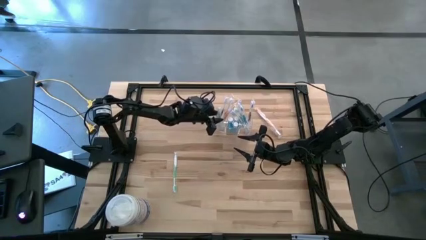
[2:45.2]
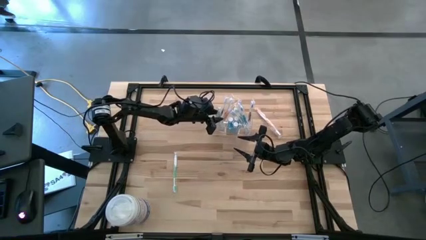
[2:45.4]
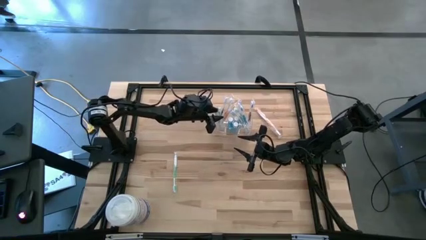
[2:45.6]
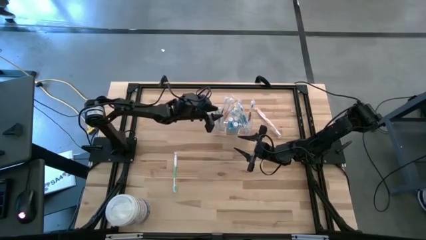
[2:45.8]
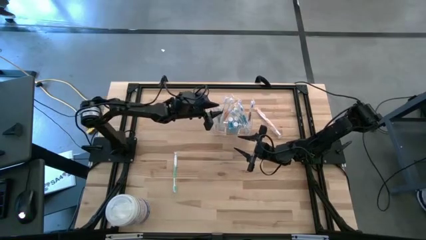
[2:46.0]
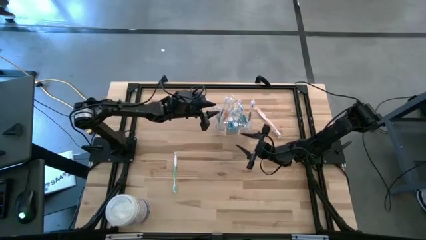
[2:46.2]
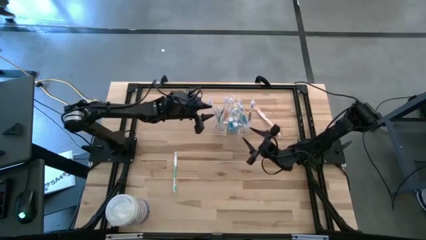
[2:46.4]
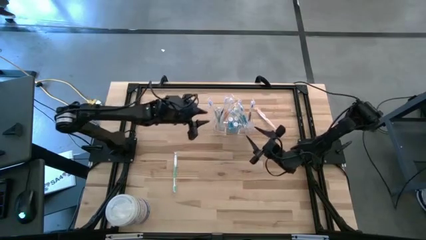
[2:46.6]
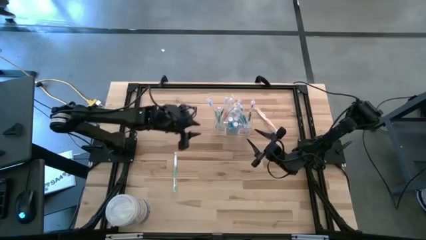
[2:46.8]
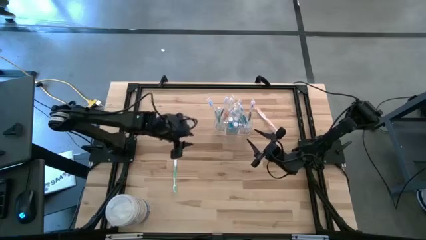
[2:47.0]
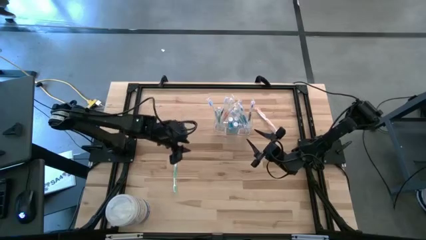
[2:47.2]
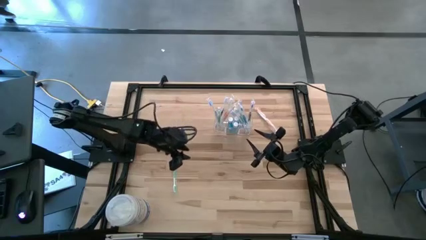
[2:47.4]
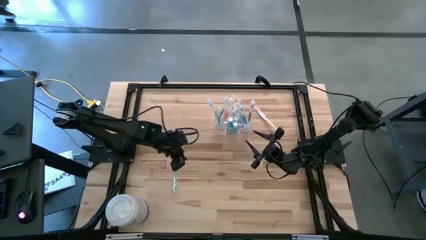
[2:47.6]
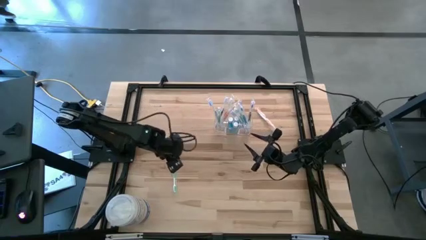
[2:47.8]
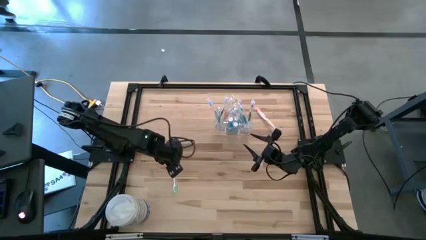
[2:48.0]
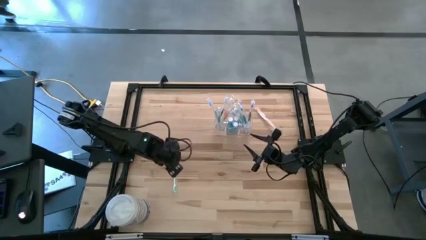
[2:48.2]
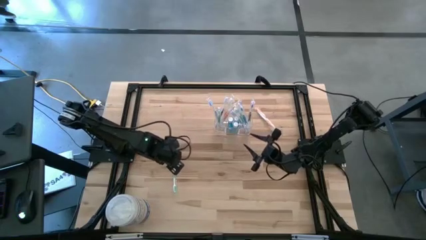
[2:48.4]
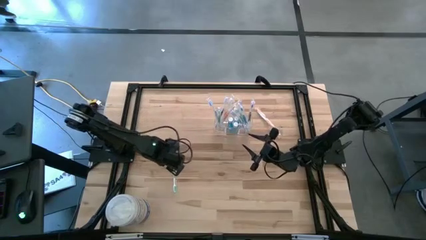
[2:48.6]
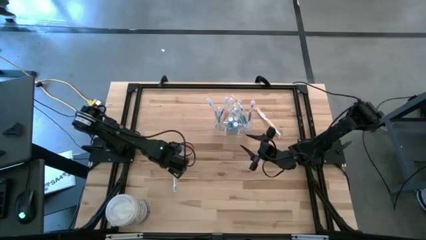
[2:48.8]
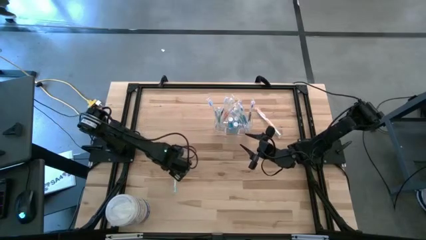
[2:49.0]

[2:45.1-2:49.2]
Task: Pick & Place toothbrushing station
Put the green toothbrush into the transparent organizer

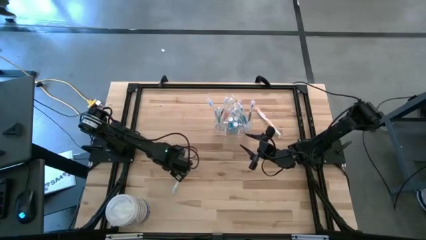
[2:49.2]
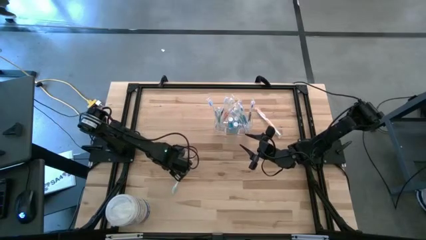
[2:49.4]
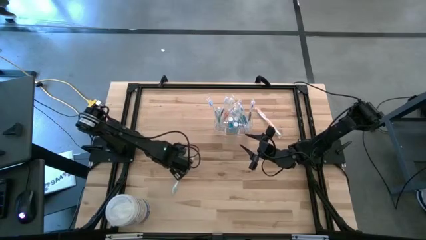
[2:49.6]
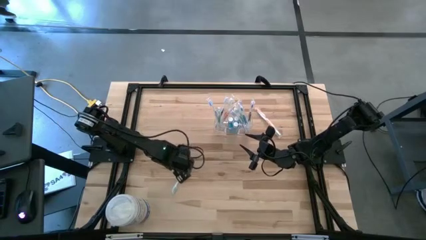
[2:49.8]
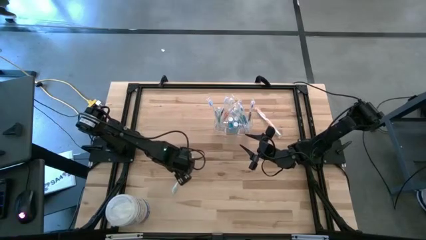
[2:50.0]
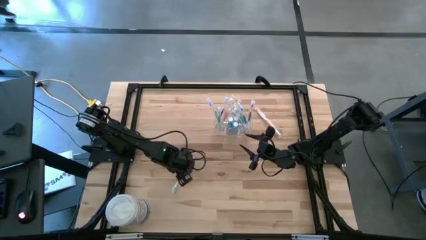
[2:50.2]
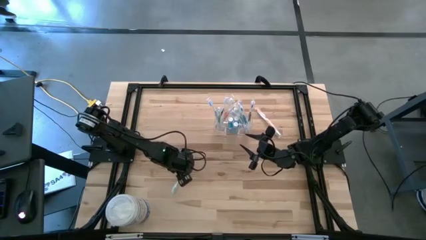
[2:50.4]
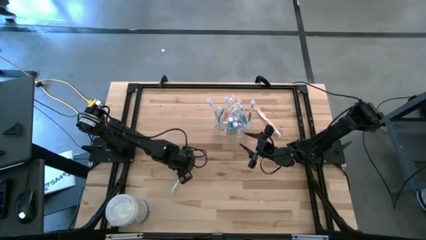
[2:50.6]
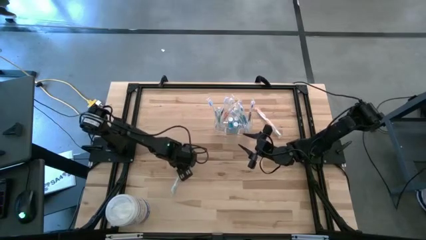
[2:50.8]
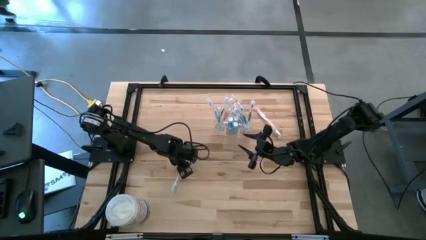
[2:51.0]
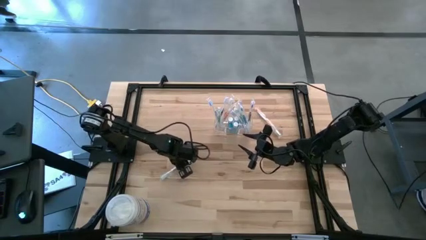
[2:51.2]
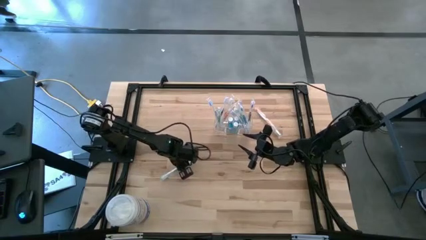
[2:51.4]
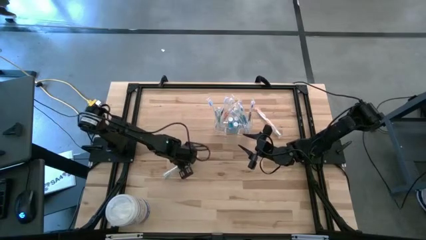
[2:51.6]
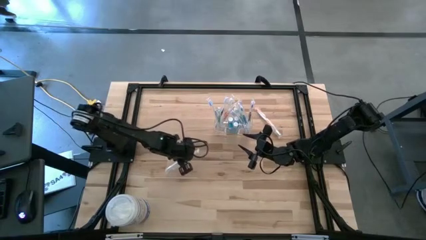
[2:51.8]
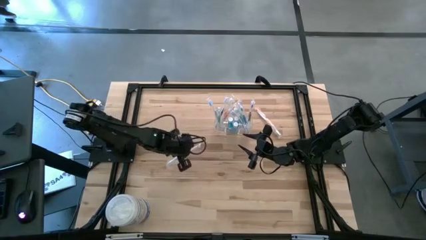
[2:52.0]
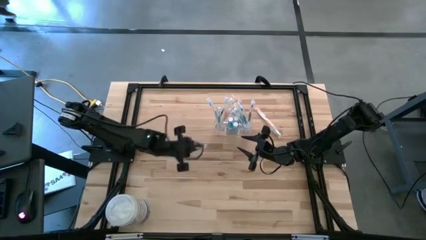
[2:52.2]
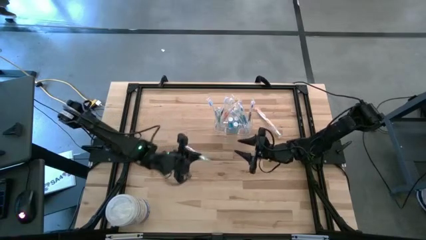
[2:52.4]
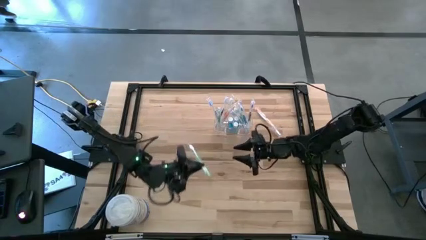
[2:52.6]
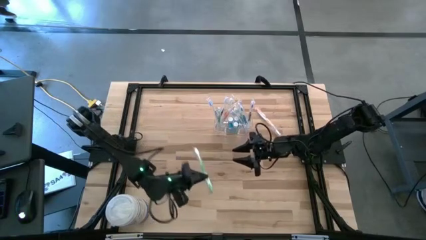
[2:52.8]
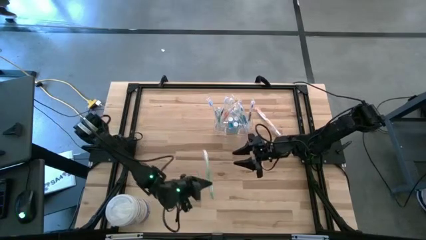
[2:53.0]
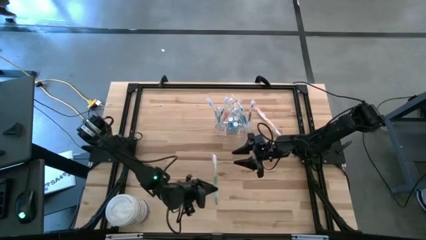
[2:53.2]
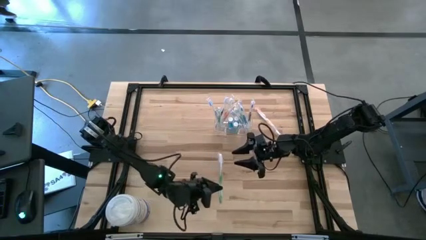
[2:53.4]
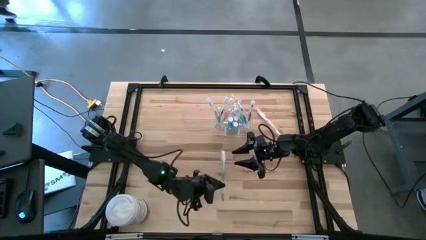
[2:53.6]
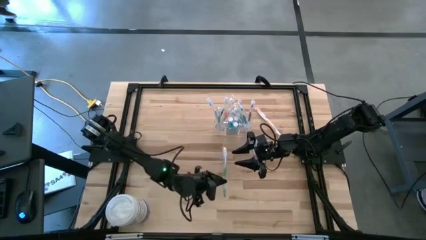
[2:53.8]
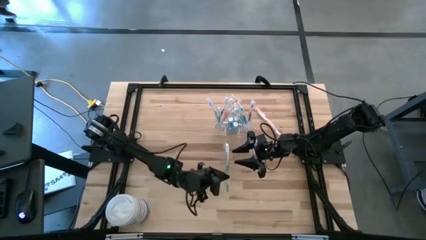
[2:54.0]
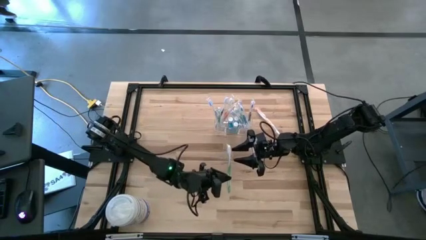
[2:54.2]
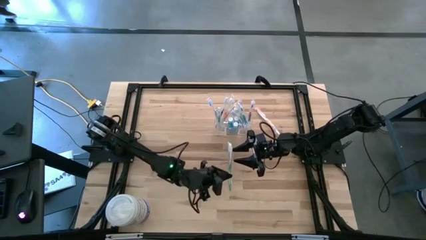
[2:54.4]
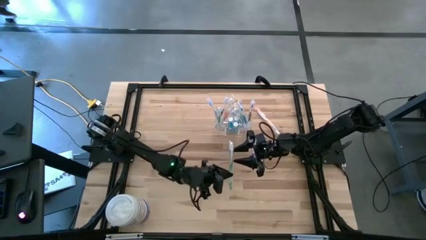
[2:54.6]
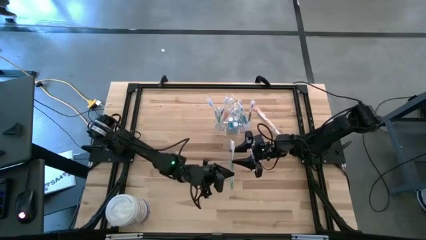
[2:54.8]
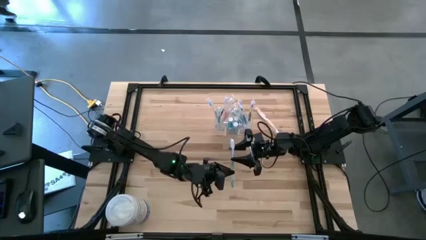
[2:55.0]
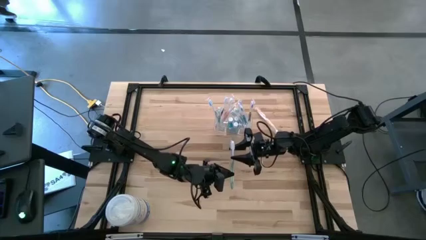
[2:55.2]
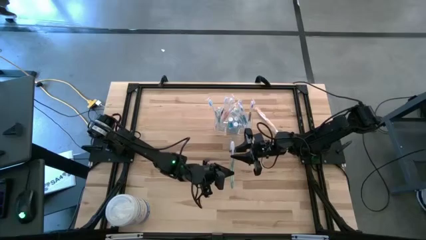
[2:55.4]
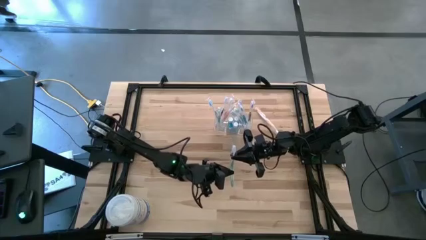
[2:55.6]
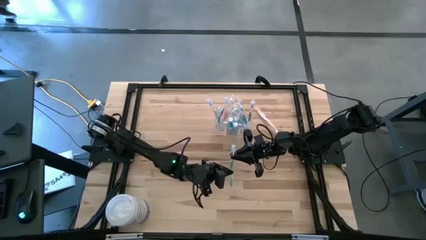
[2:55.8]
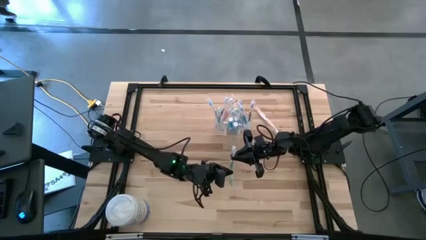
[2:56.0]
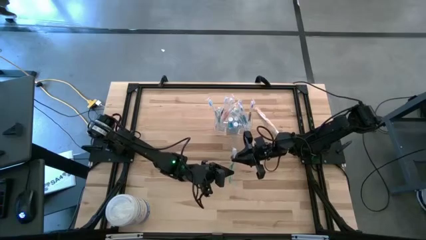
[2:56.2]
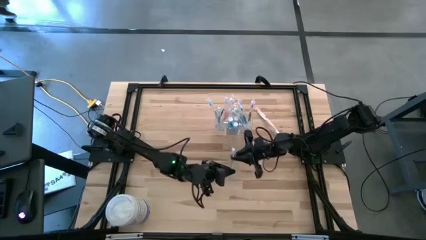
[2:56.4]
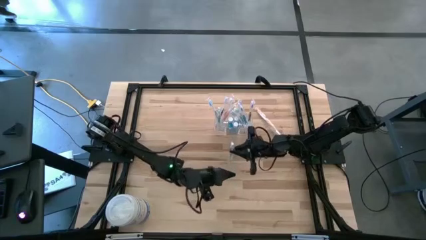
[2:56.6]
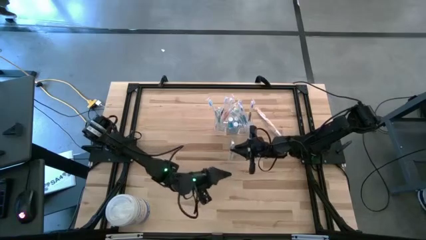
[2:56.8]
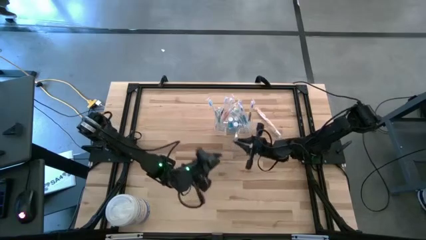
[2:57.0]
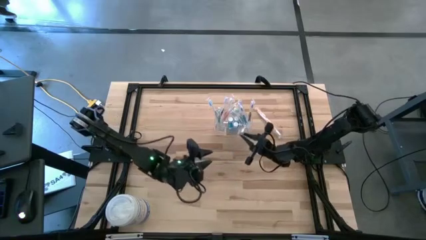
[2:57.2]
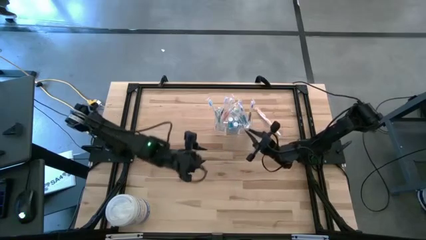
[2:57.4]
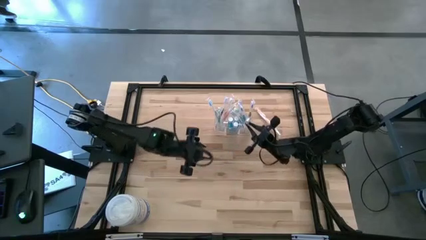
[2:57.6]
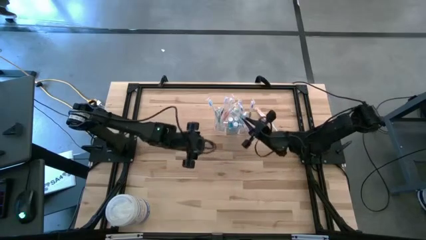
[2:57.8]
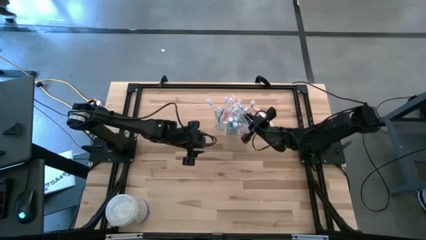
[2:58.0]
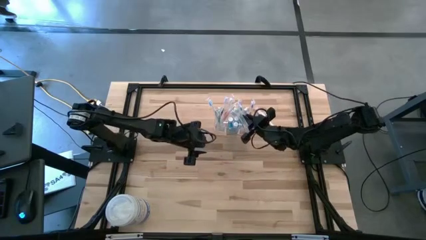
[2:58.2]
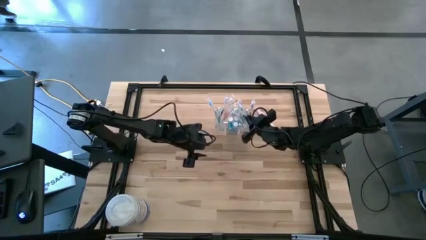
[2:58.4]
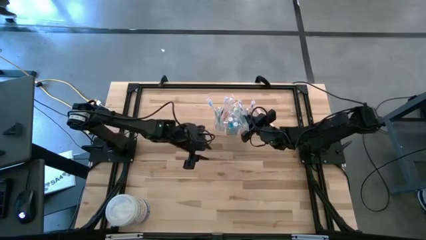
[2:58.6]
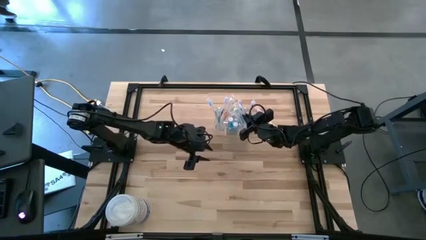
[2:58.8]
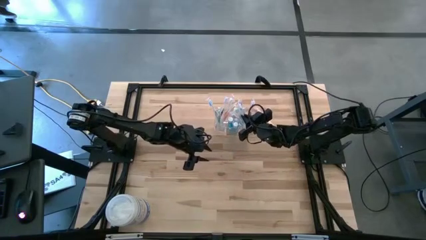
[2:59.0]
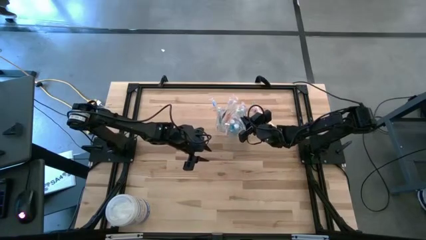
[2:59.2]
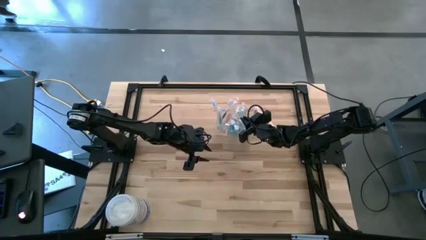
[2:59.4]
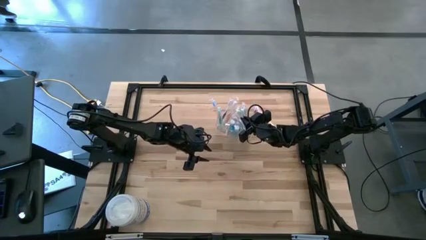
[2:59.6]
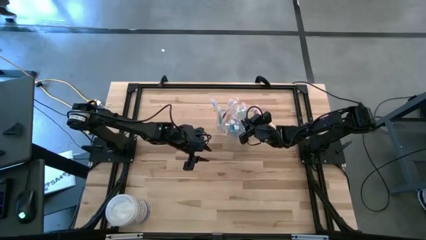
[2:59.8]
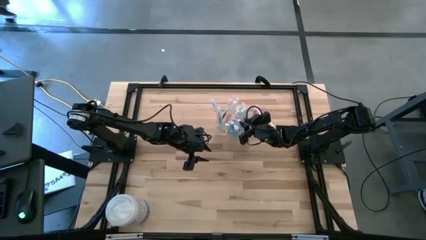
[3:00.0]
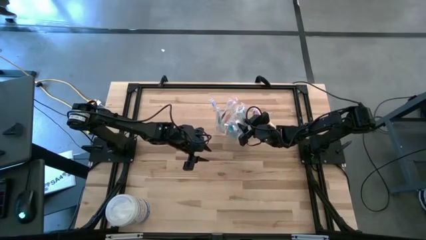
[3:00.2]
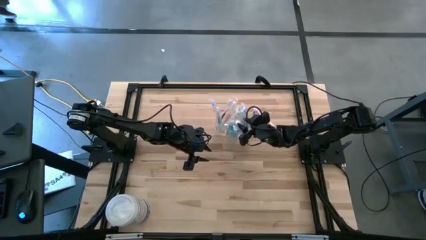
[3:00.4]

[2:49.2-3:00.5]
Put the green toothbrush into the transparent organizer

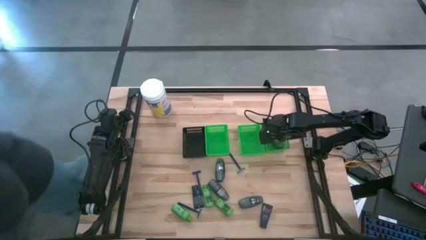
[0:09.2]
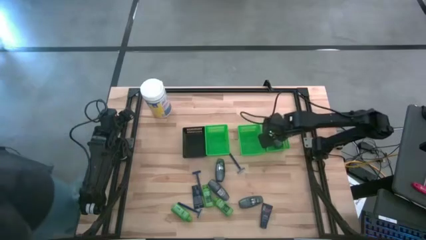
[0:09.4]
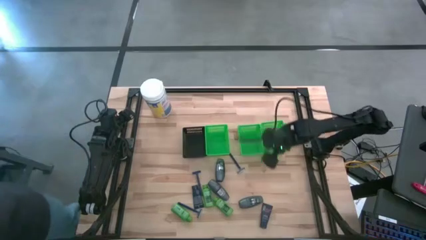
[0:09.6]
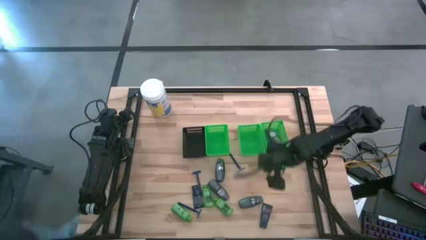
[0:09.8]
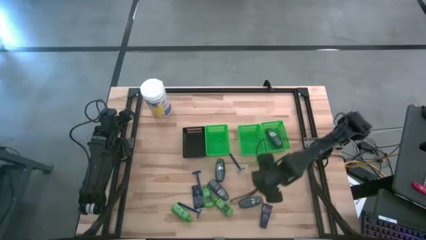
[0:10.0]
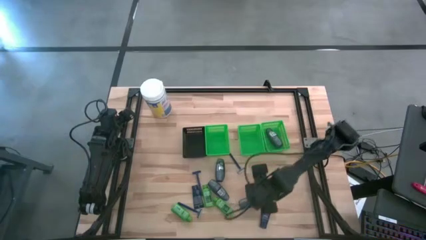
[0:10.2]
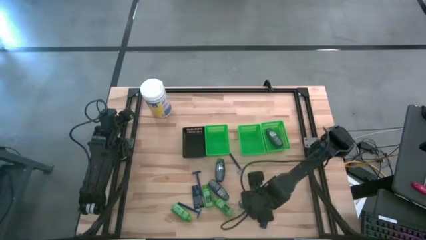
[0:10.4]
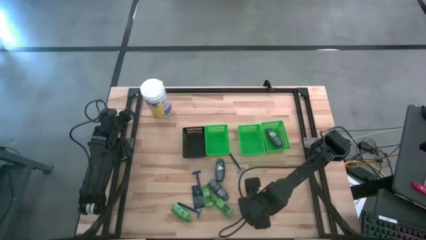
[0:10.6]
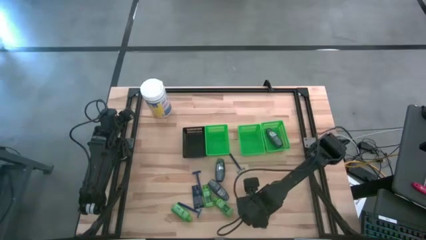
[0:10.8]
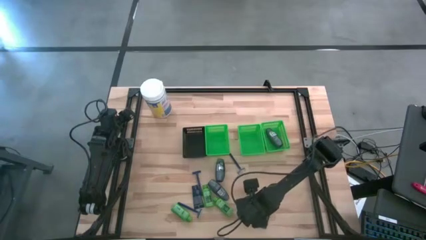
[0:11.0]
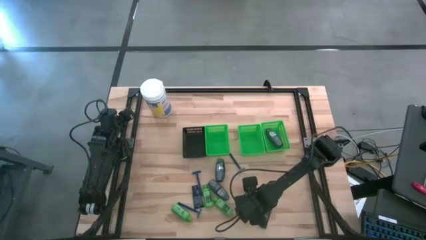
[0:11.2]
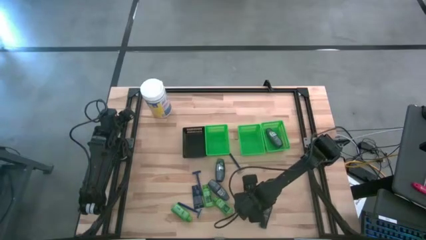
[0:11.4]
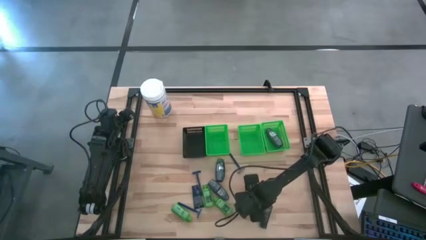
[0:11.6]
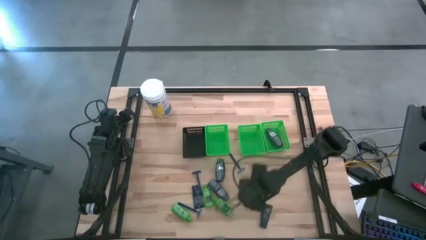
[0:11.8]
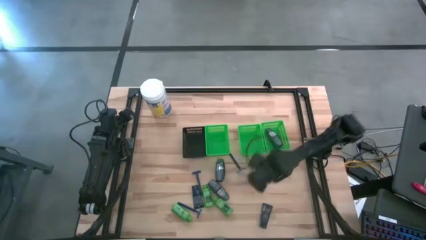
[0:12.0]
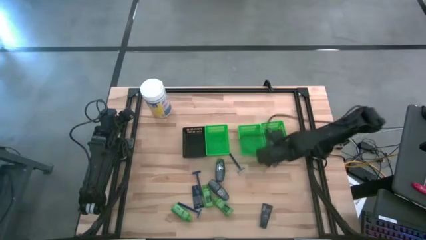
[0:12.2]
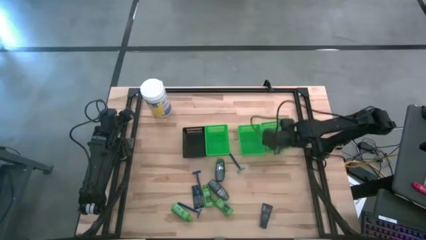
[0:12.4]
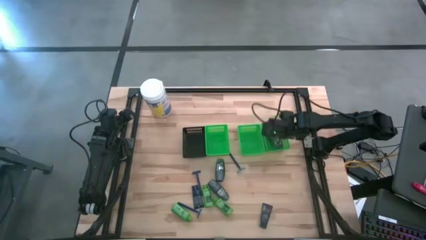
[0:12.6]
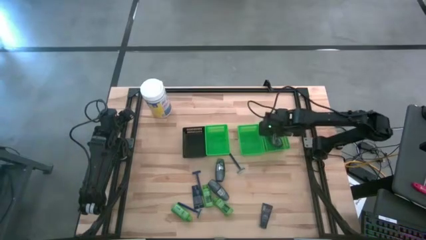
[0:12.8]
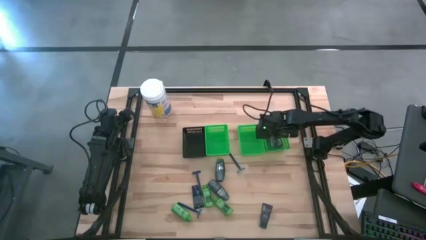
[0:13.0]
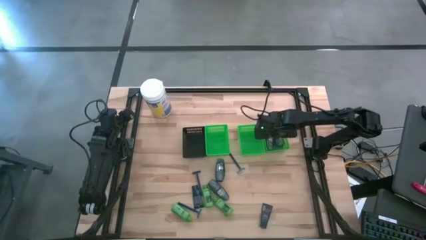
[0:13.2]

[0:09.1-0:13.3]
Task: Pick & Place Travel size toiletries
Put the black deodorant into the right green bin
